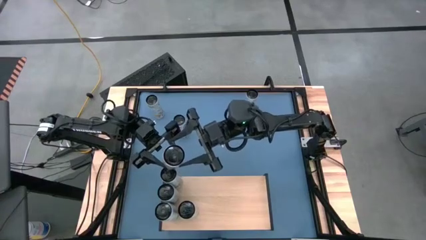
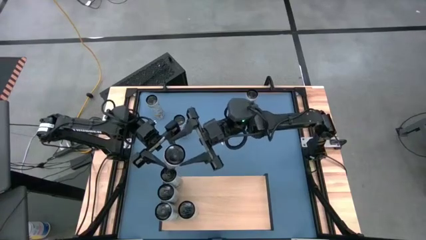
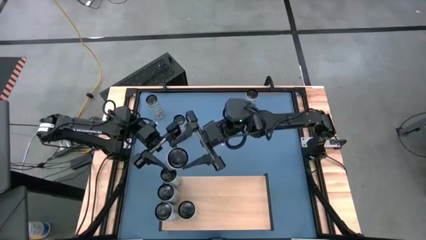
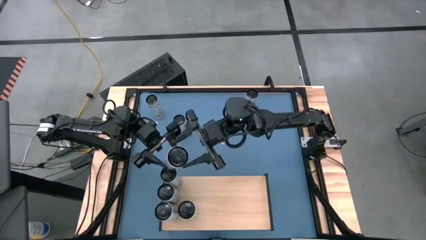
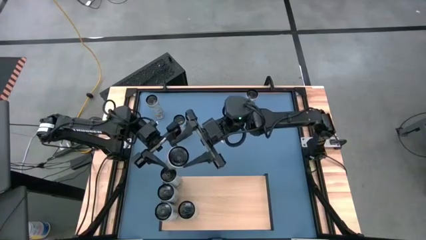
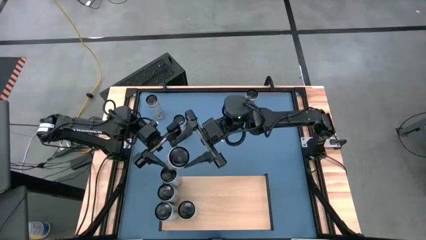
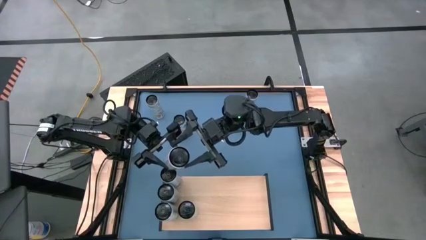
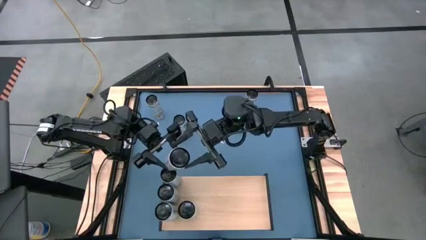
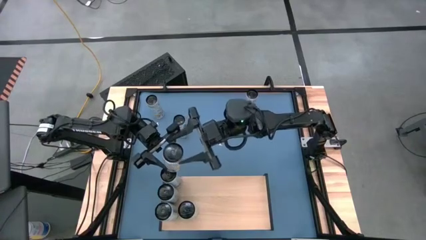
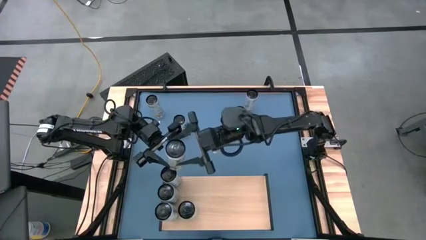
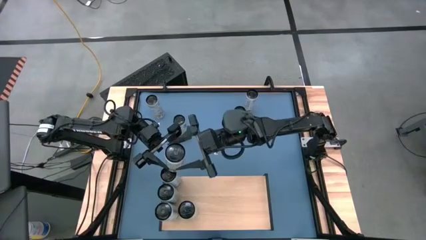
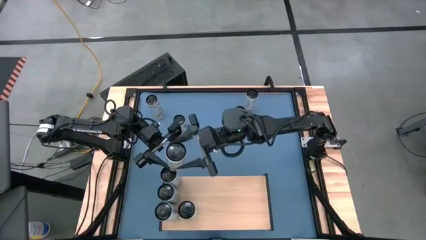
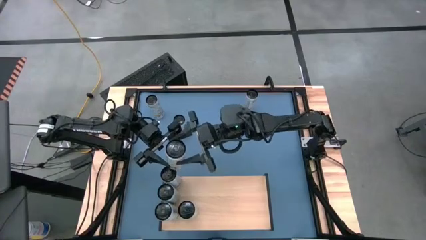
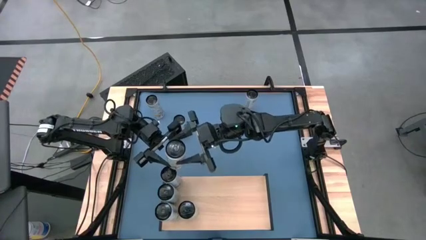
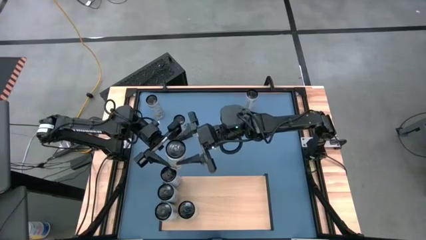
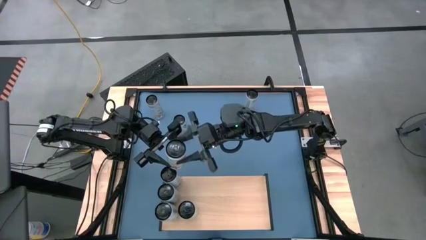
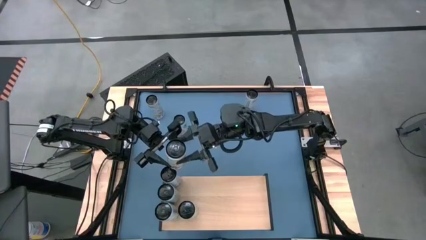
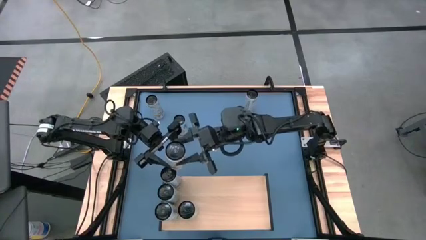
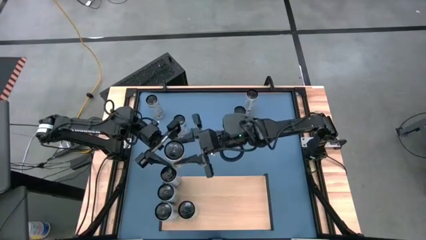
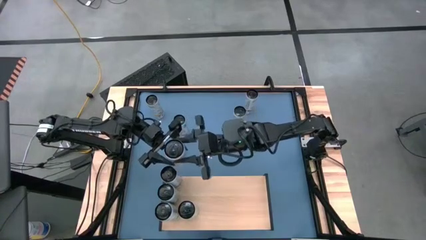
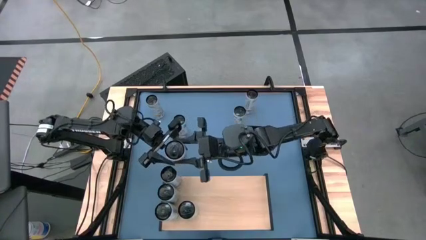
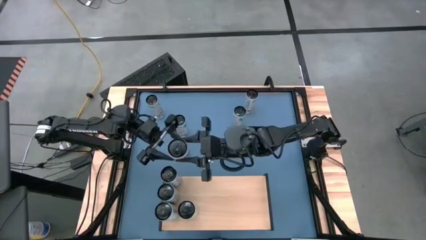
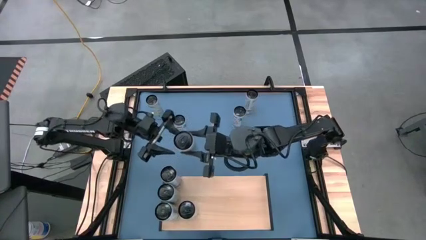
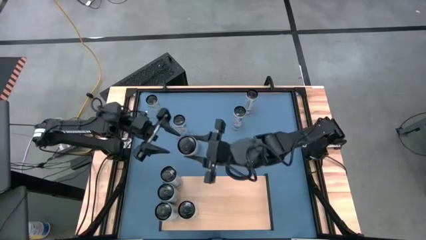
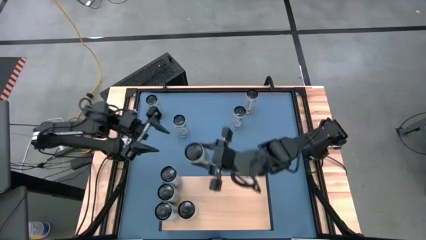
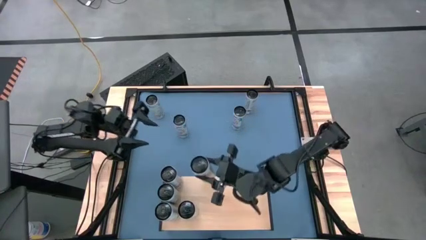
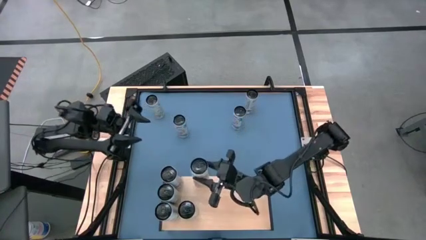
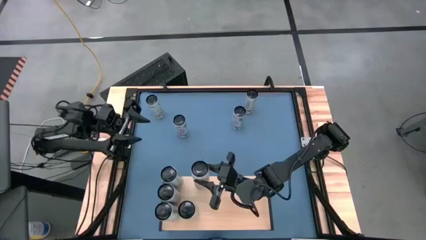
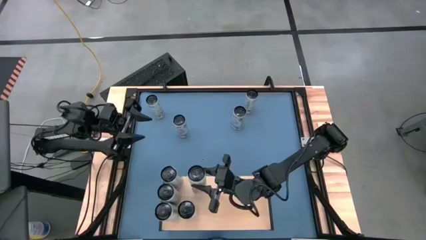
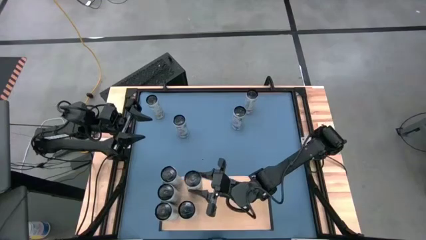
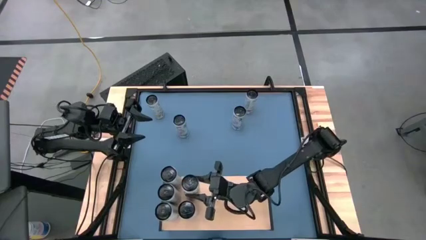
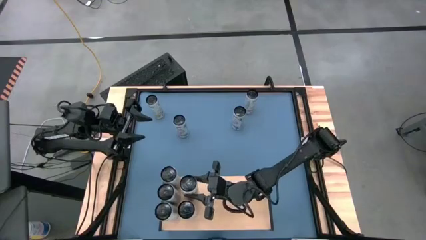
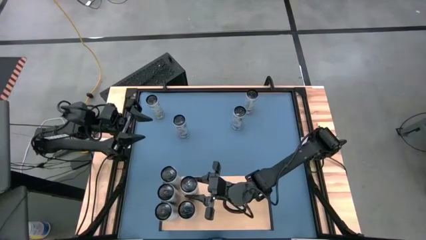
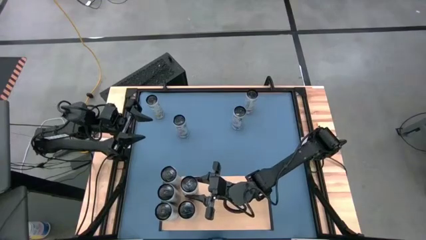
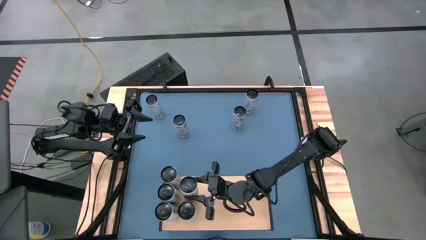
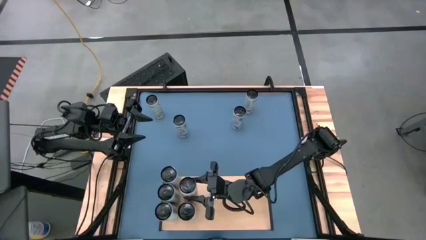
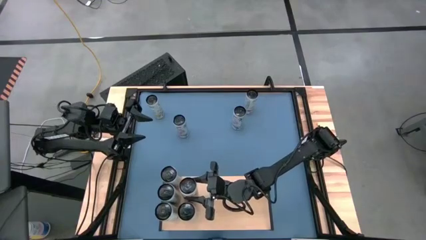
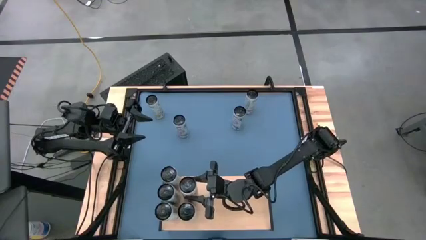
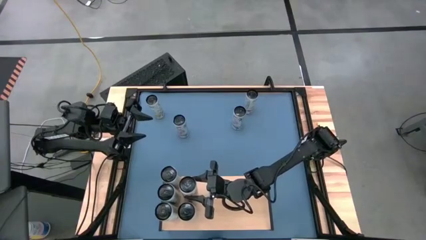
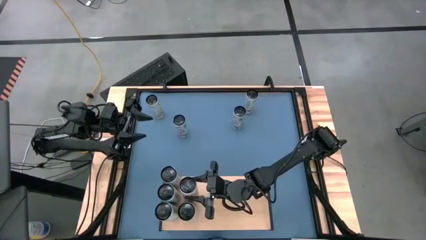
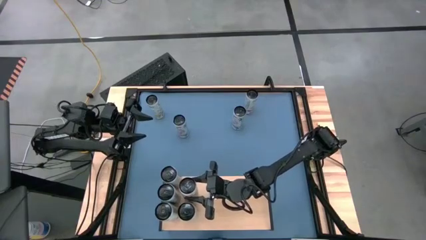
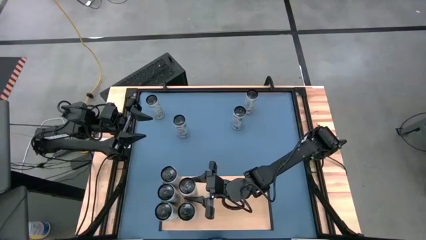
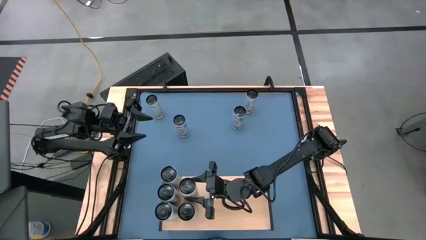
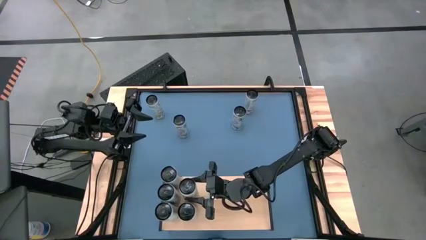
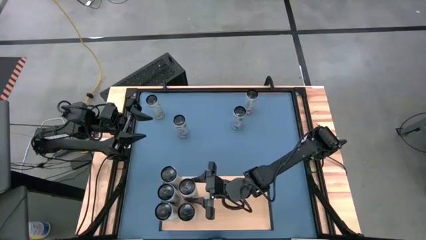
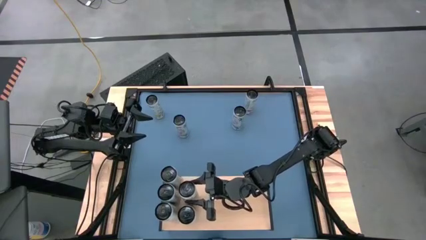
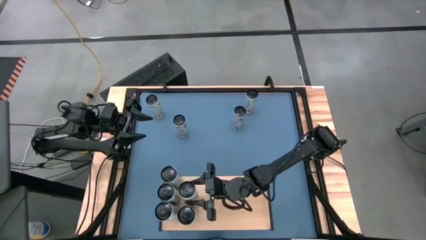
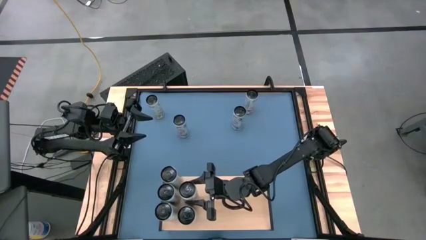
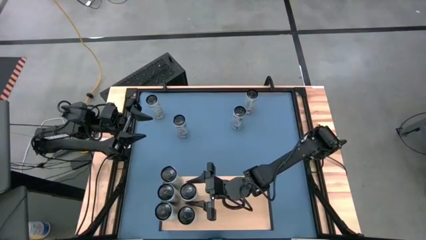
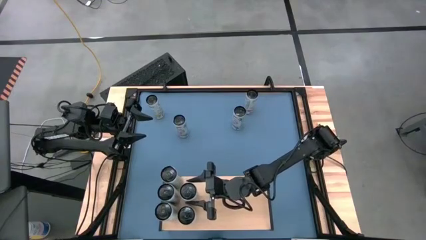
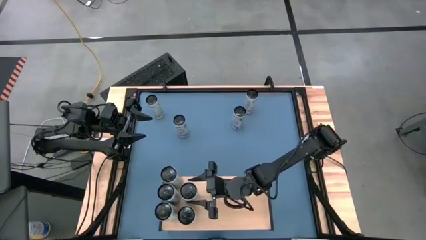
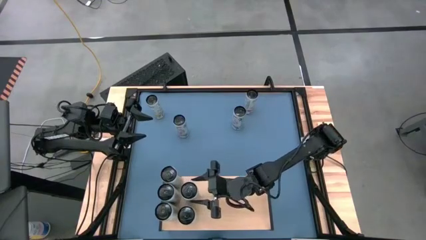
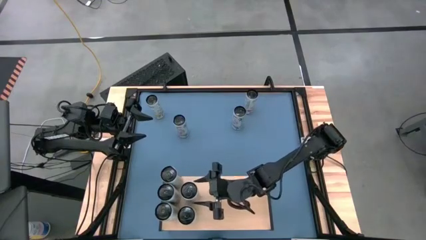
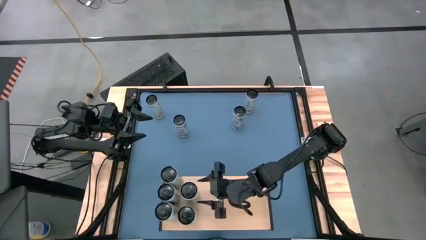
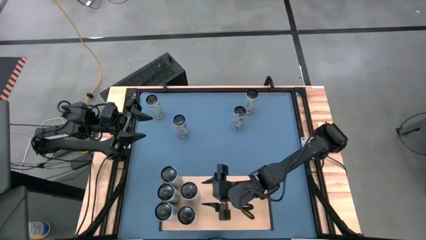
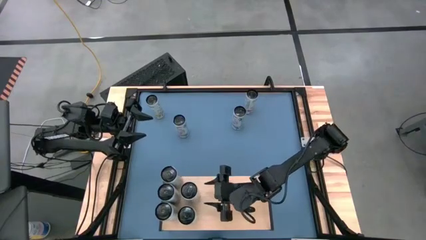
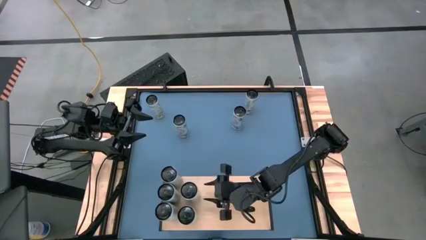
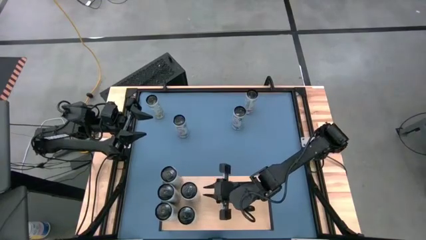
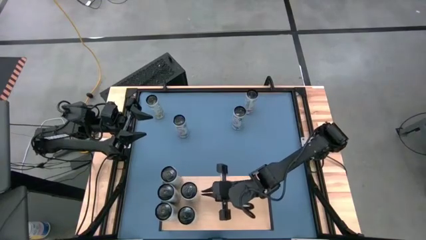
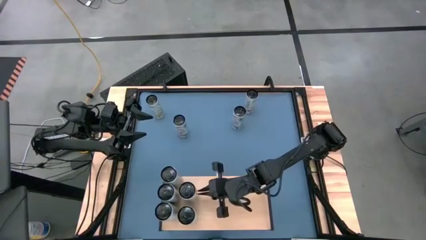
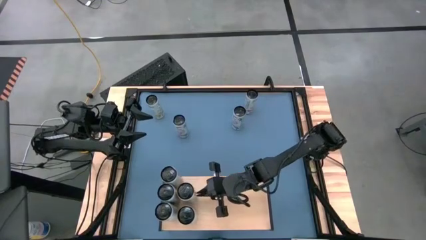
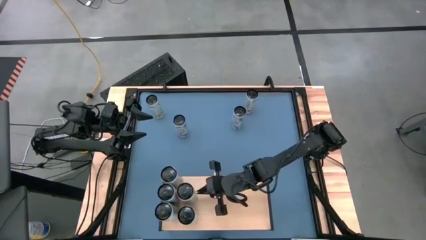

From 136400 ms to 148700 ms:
Task: Place canned beverage on shelf
Put the right white yellow soda can on the shelf aligned with the other white yellow soda can

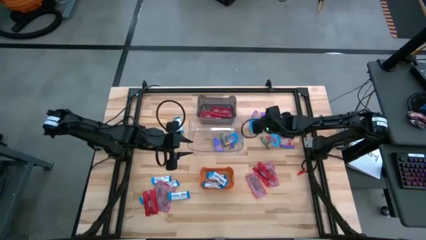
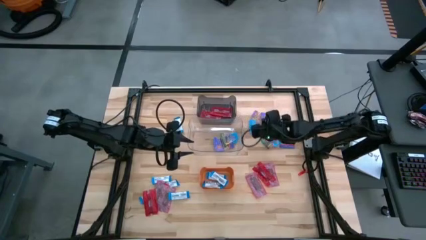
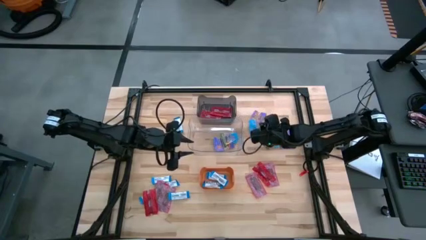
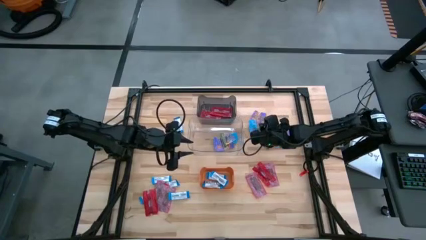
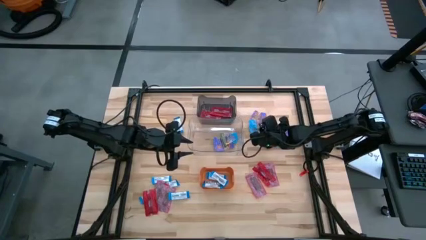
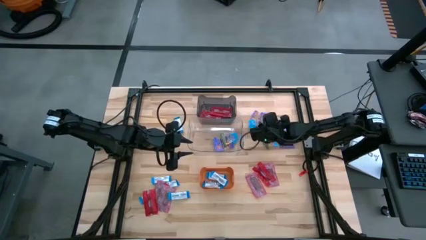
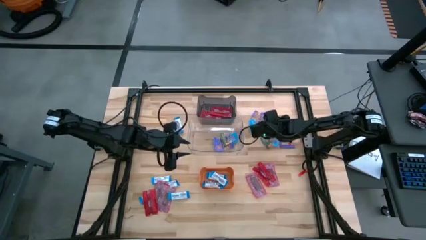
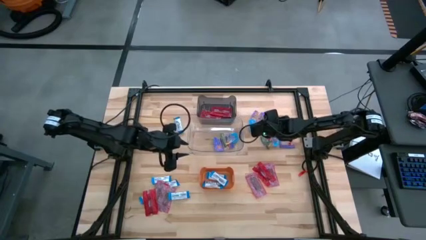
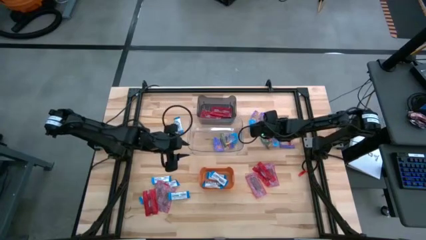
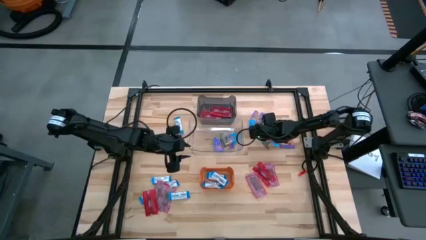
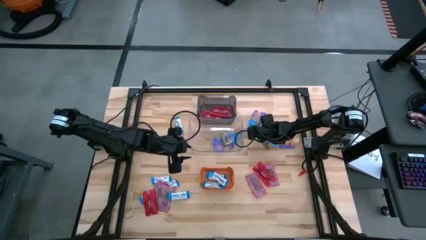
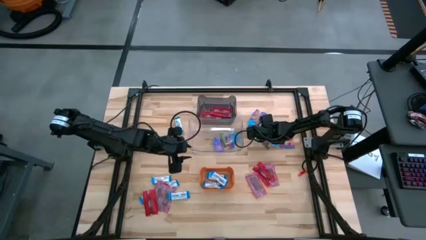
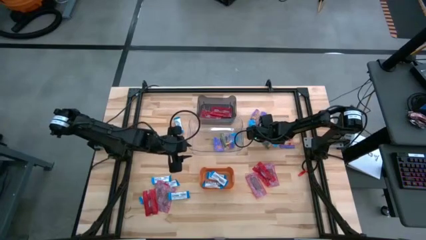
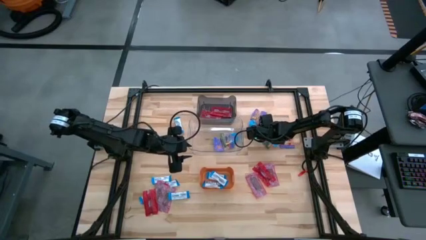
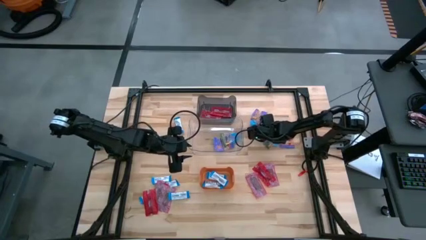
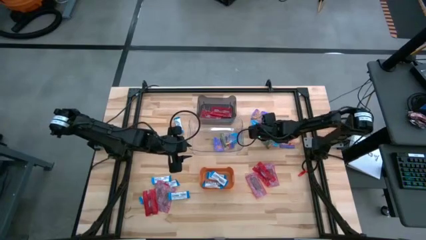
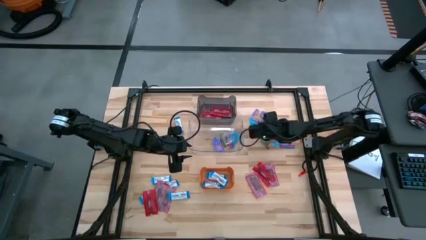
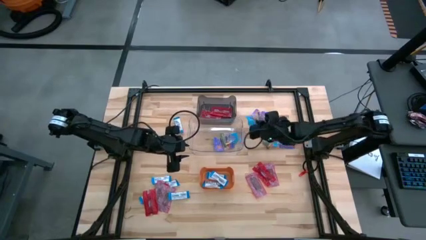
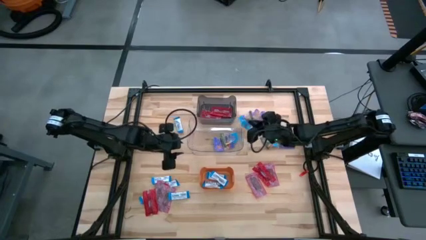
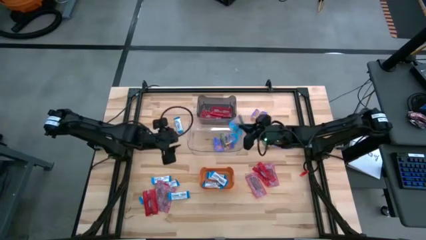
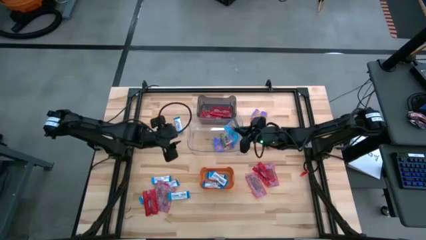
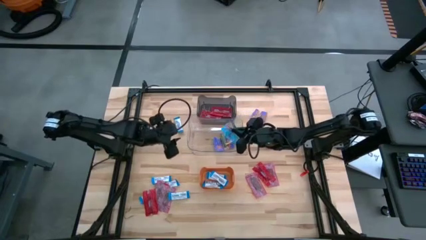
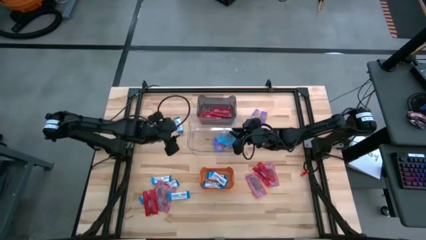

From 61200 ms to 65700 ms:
Task: Sort candy
Put the blue candy into the clear transparent bin
